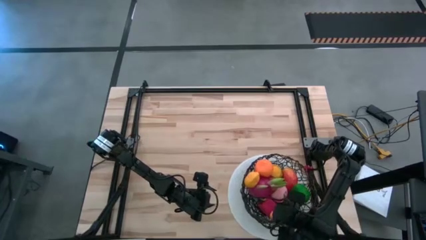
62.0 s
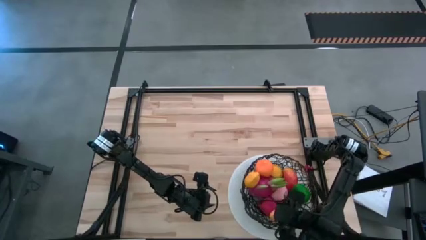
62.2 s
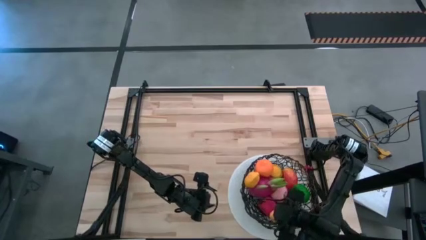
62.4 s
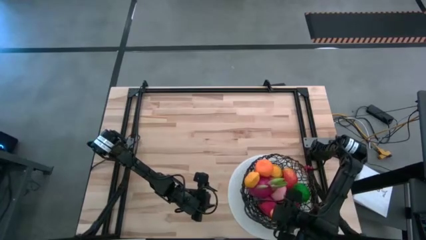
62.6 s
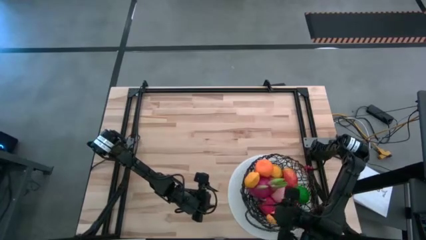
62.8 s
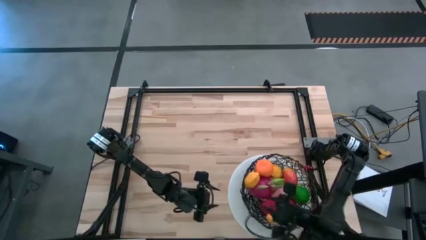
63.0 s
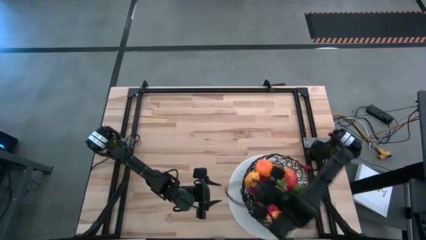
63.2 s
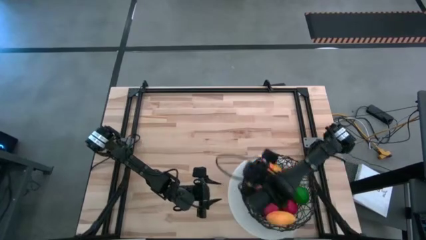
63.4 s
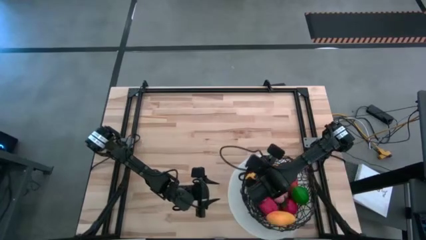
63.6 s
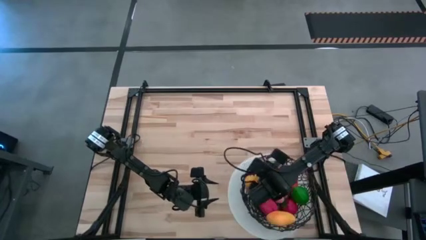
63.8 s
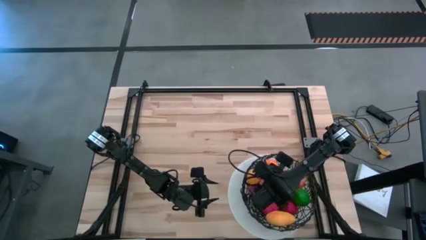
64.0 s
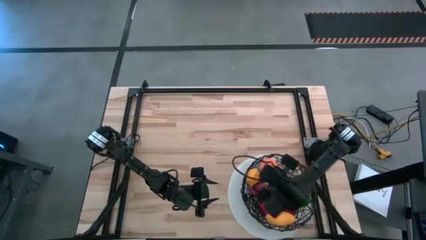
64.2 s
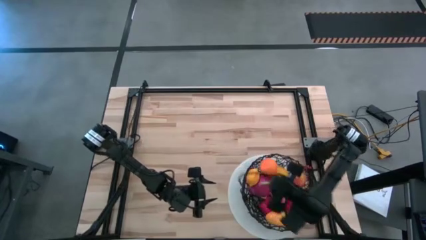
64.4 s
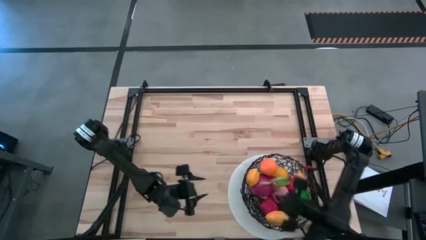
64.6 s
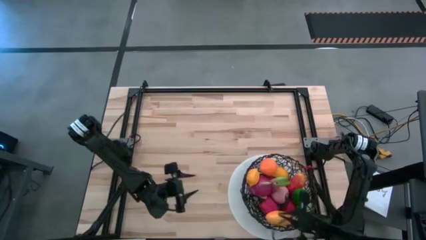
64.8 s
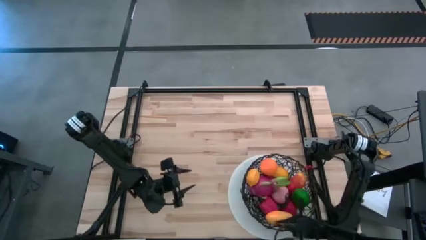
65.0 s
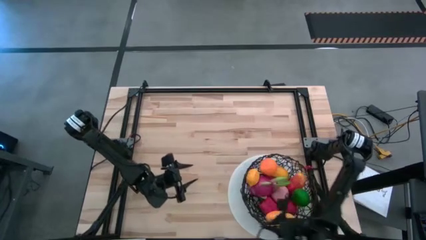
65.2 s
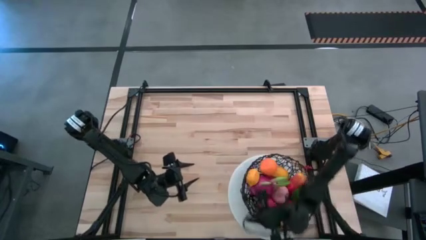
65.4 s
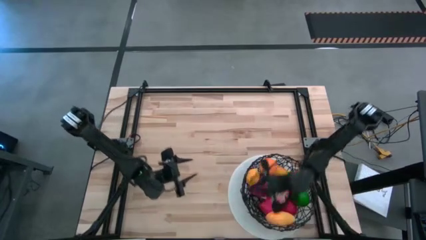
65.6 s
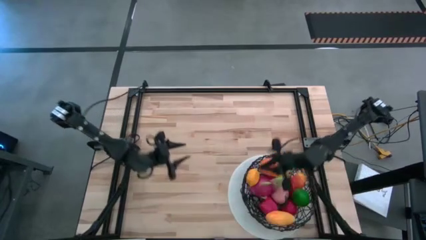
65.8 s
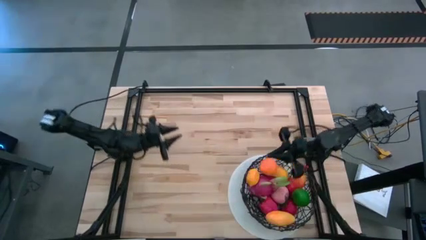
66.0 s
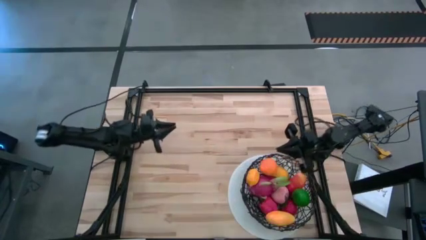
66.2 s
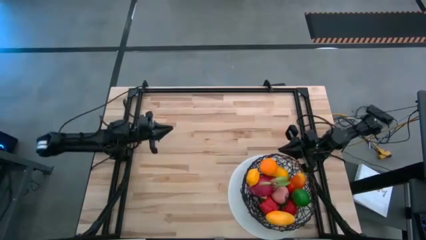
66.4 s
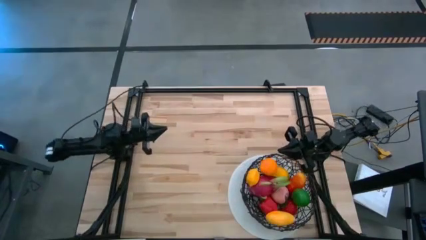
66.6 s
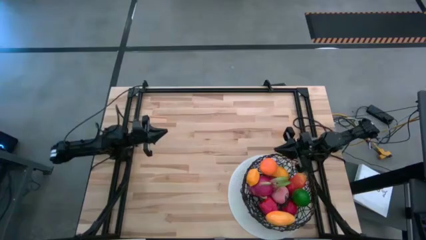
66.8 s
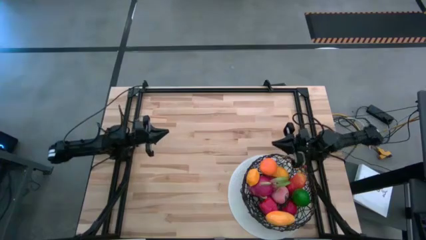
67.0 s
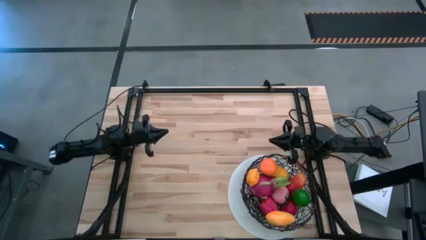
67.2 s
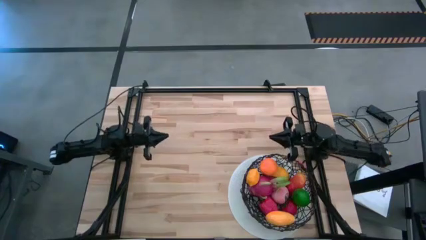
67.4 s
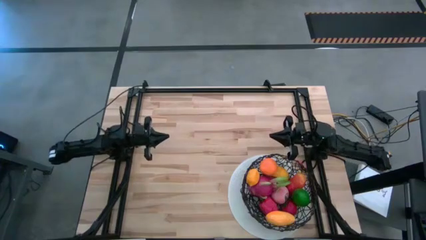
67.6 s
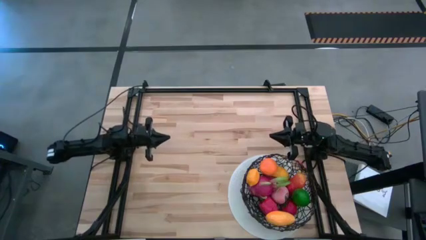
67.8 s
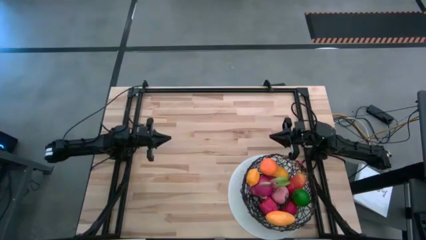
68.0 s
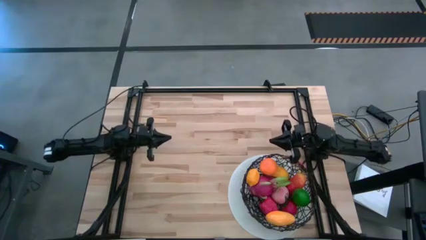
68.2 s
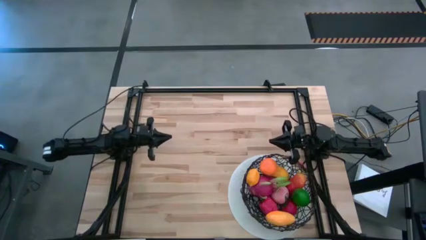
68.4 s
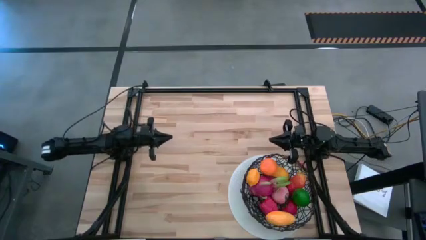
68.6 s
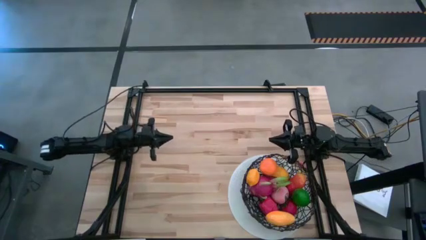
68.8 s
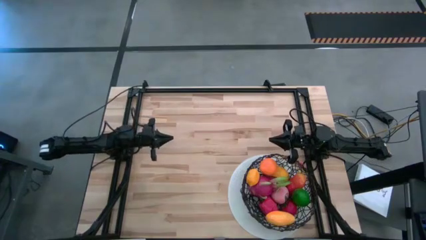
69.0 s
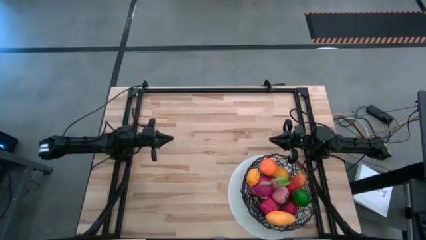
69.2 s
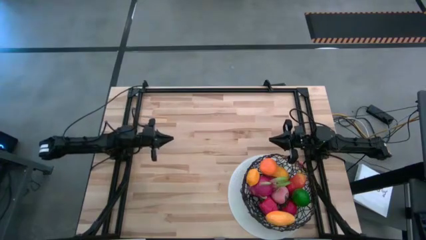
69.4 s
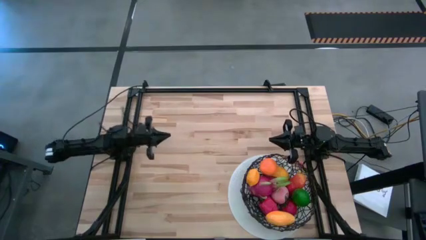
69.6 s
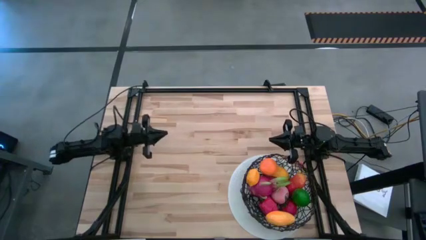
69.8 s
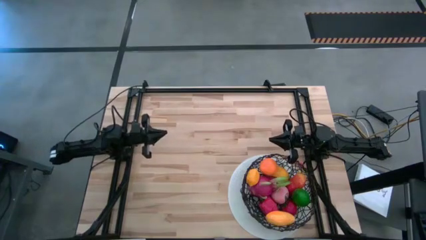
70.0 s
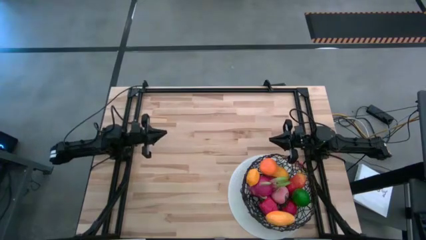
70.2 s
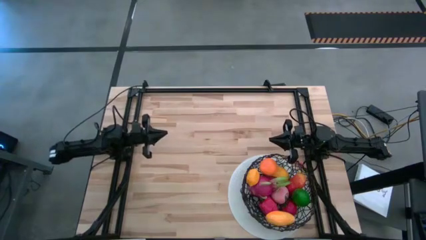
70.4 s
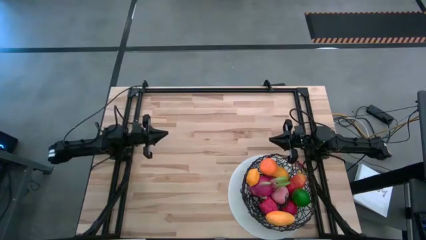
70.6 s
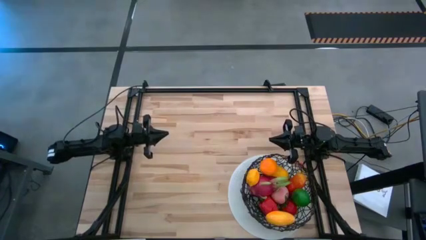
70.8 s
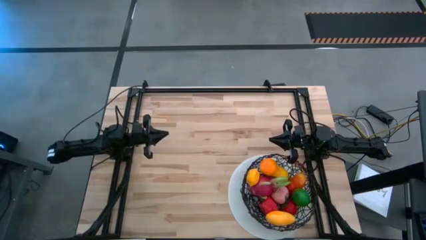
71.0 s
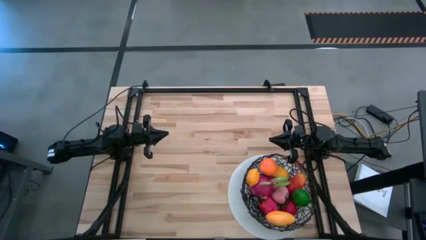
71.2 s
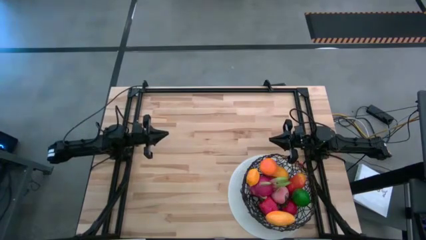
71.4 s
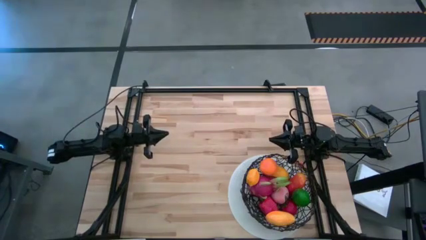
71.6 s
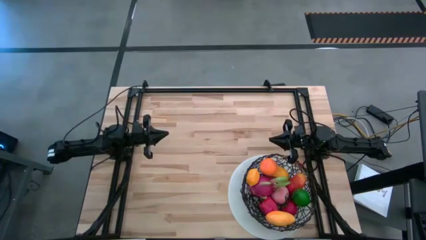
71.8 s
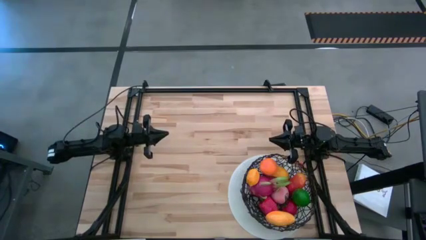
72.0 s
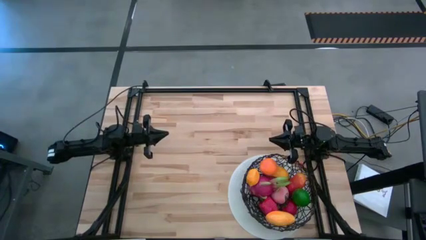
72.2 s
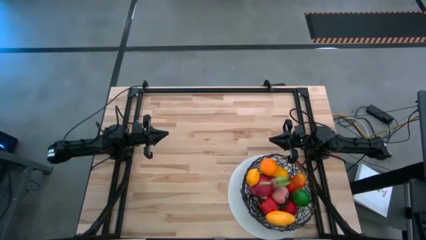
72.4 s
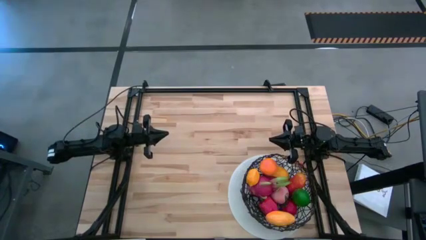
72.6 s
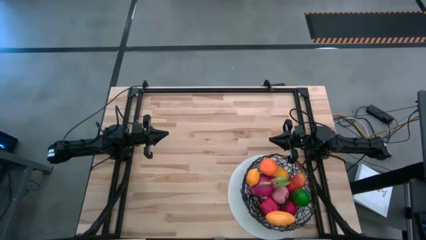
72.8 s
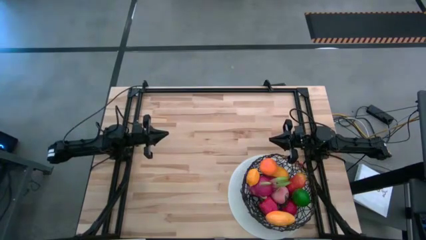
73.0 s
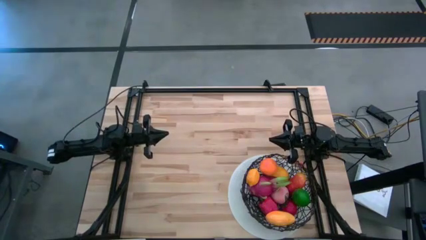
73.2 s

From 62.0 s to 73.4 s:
Task: Build produce basket
Return to Home Position

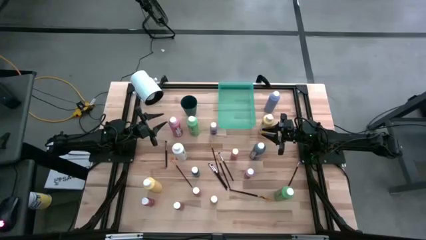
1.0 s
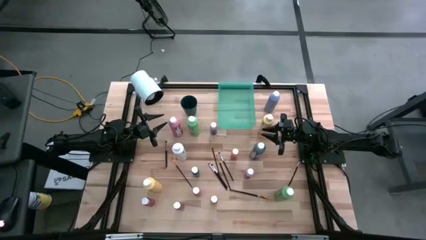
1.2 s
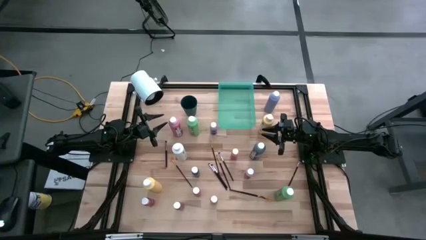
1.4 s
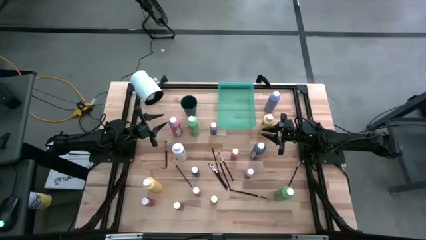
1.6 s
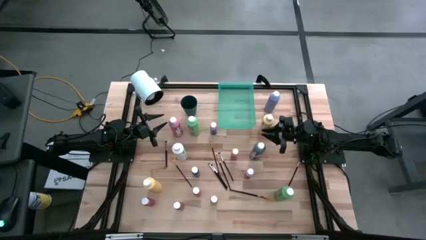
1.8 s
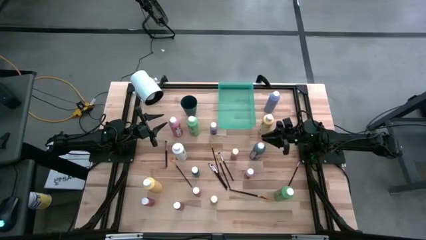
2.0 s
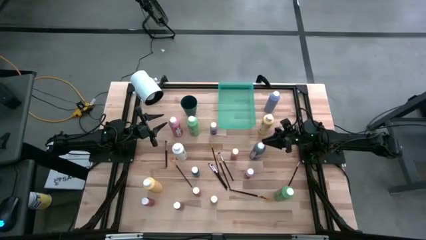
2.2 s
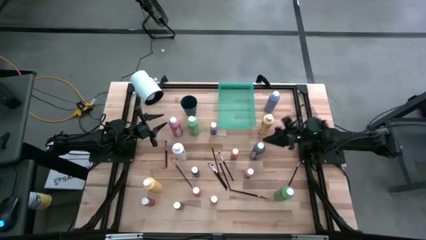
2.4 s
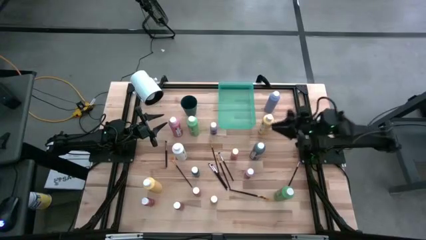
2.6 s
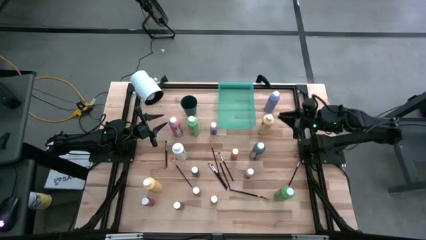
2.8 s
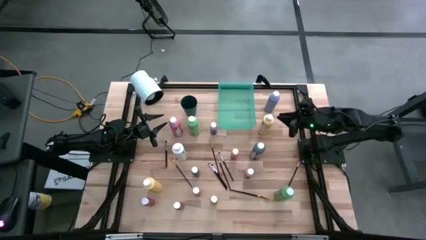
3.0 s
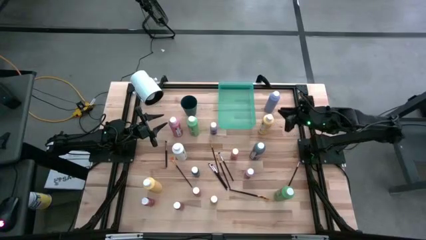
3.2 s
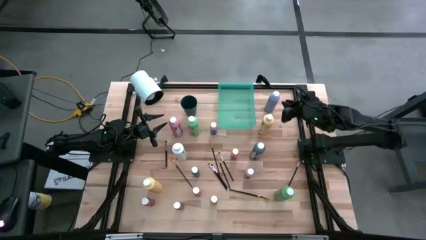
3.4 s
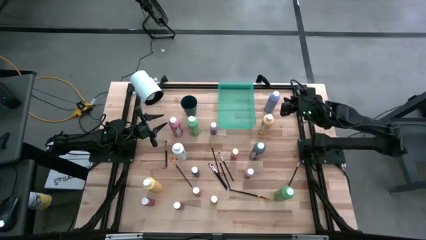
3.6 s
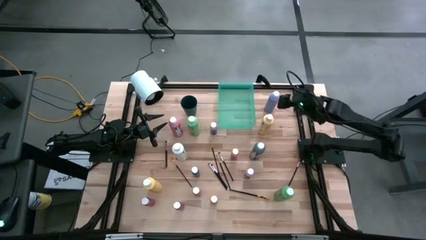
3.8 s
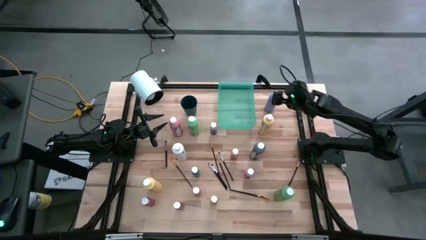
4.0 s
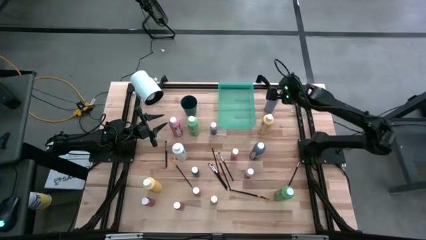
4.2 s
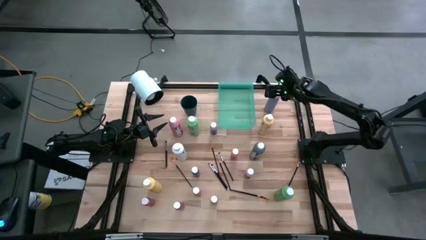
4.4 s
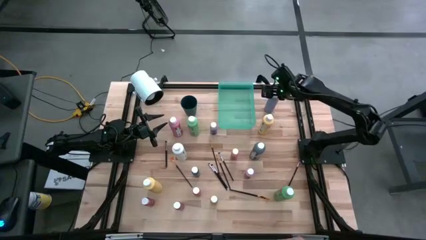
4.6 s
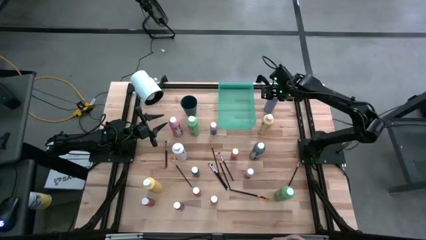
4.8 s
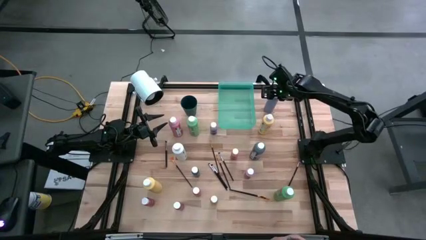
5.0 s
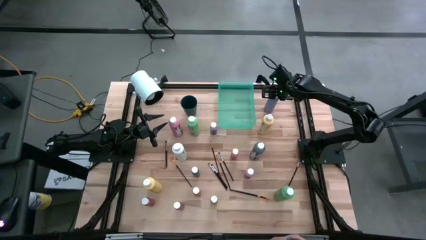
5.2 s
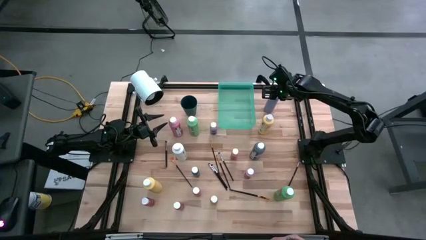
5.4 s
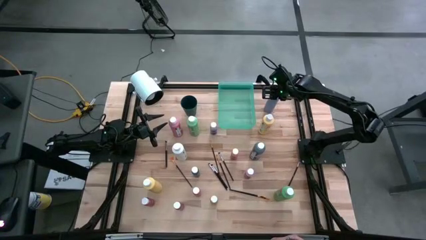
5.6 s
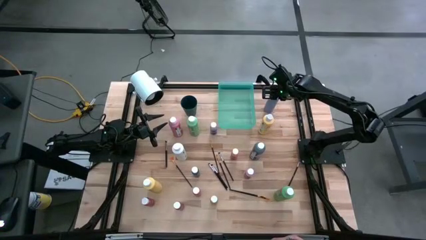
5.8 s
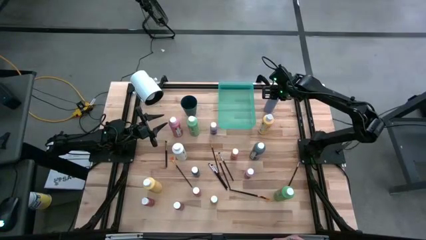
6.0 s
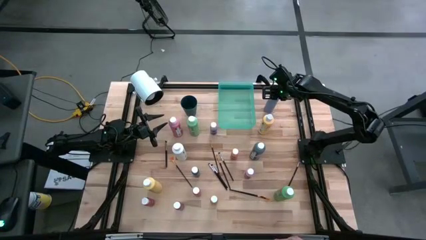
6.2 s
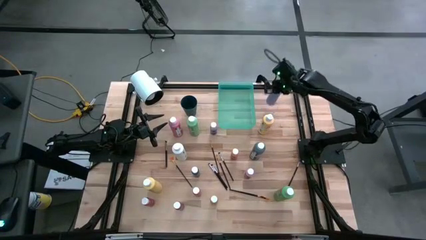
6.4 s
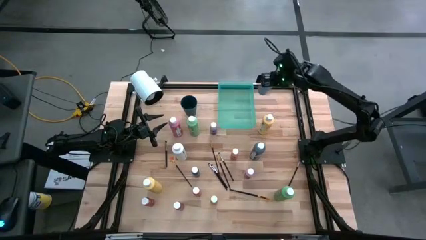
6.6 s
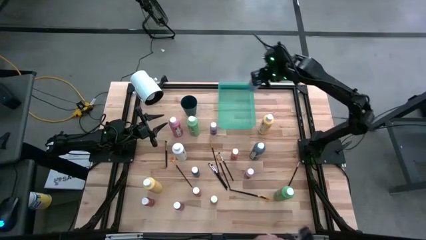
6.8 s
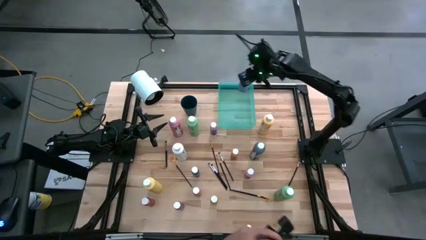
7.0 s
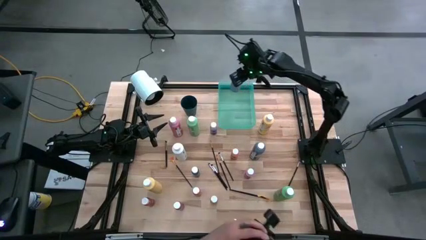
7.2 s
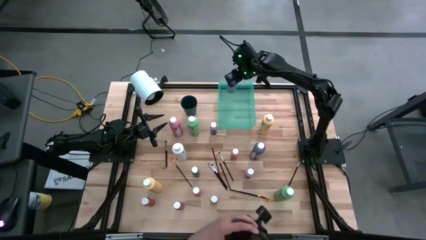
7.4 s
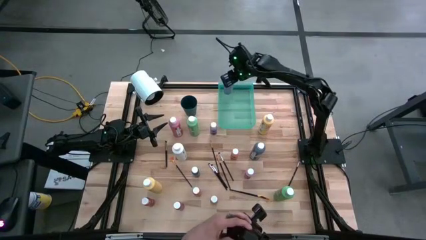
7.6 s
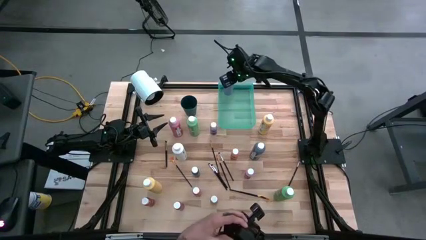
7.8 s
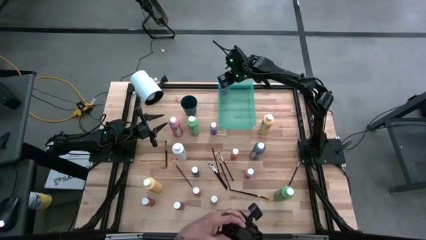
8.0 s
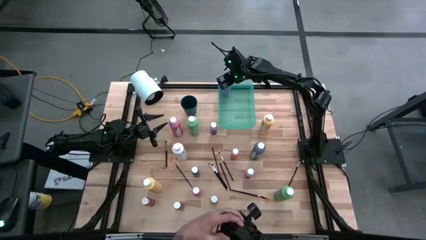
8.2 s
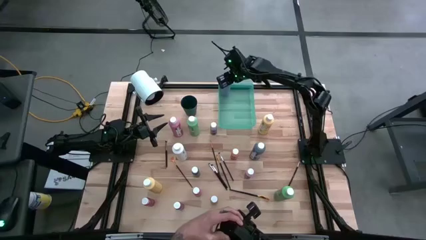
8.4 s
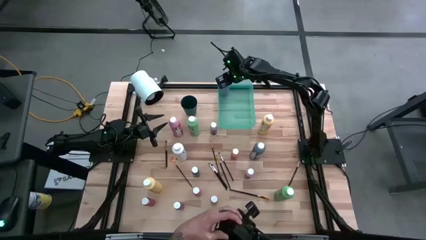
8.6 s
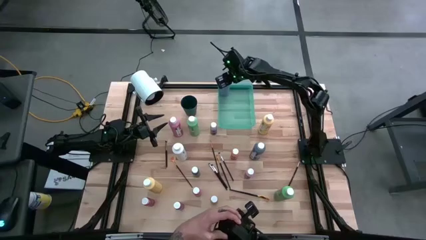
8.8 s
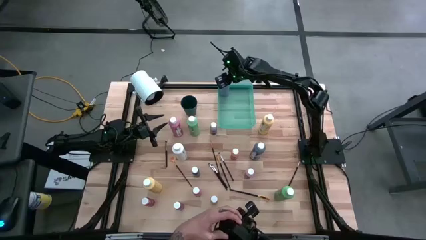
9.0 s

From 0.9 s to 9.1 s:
Task: Pick & Place Paint Supplies
Put the blue big paint bottle into the green bin
